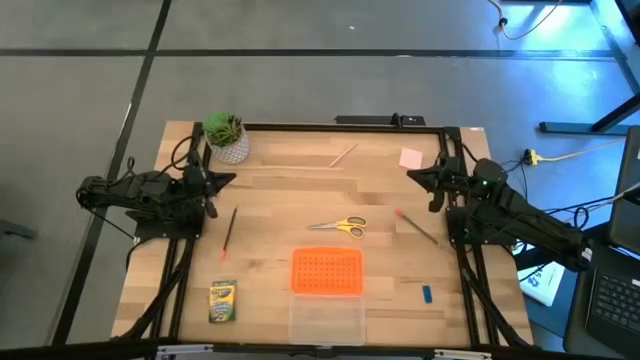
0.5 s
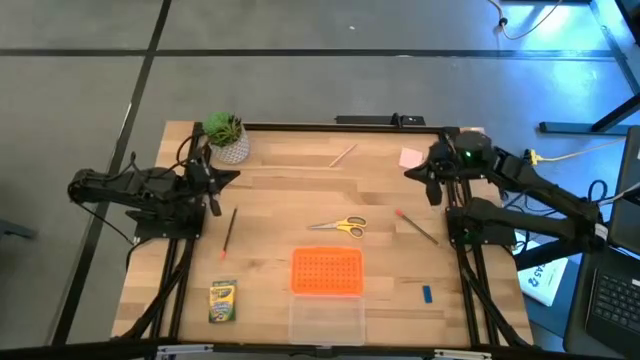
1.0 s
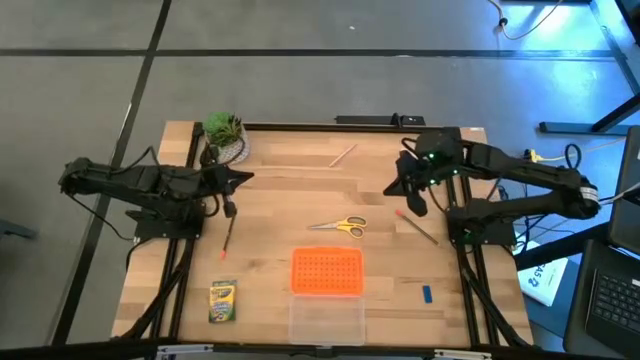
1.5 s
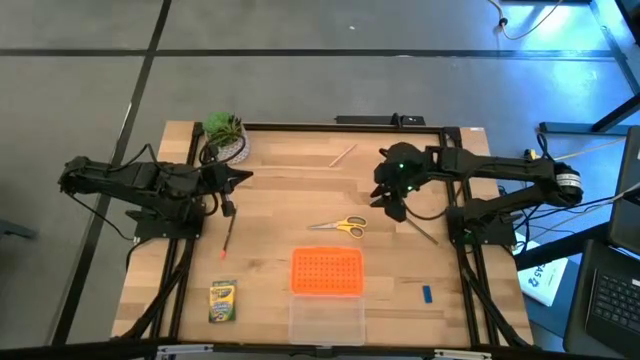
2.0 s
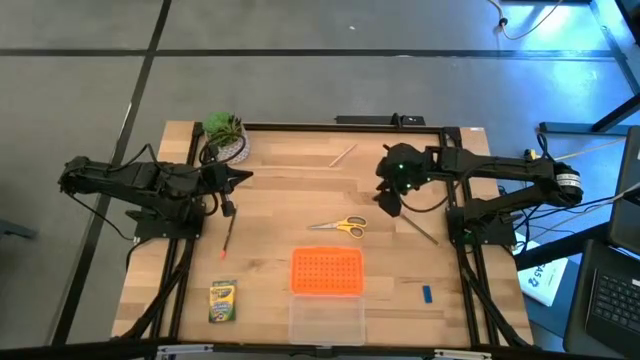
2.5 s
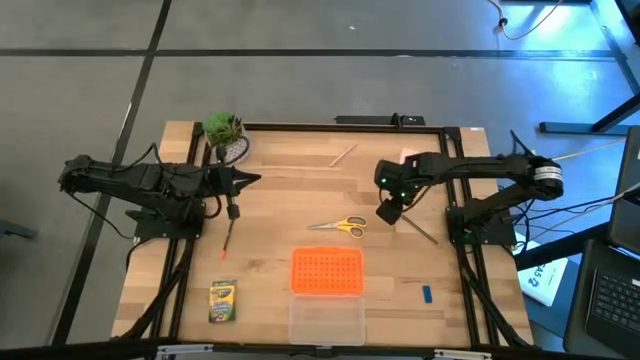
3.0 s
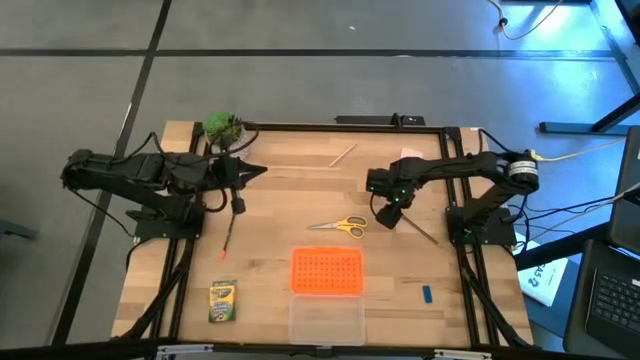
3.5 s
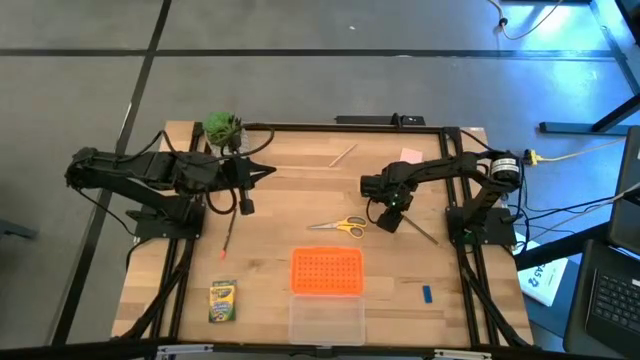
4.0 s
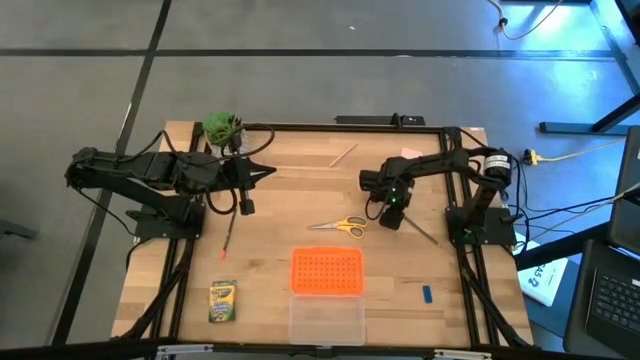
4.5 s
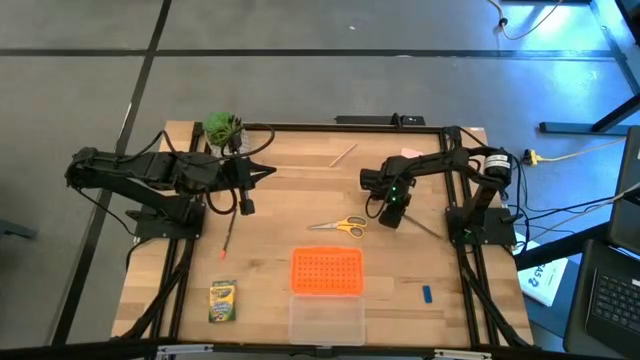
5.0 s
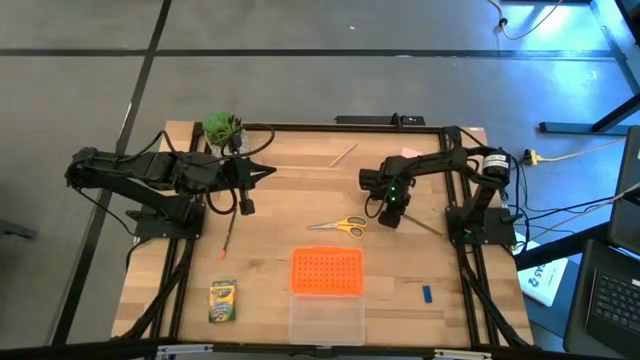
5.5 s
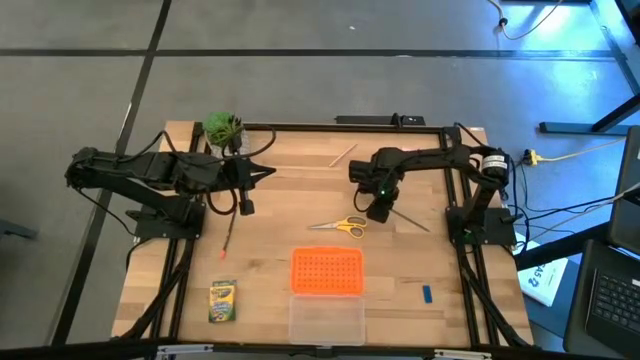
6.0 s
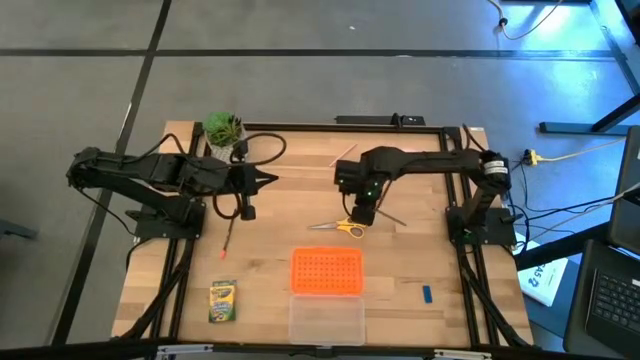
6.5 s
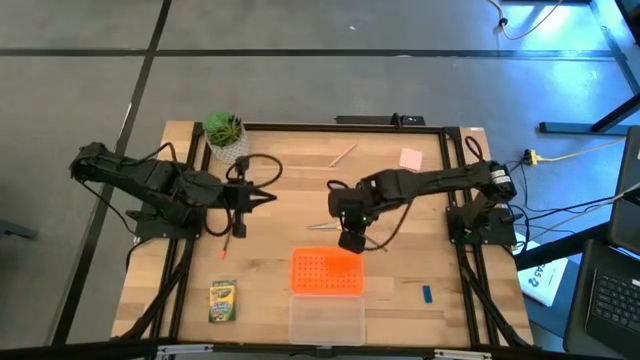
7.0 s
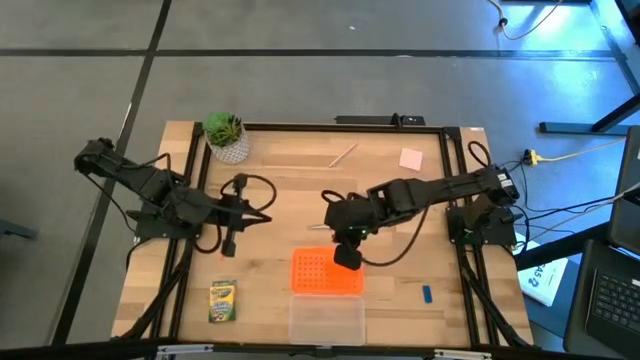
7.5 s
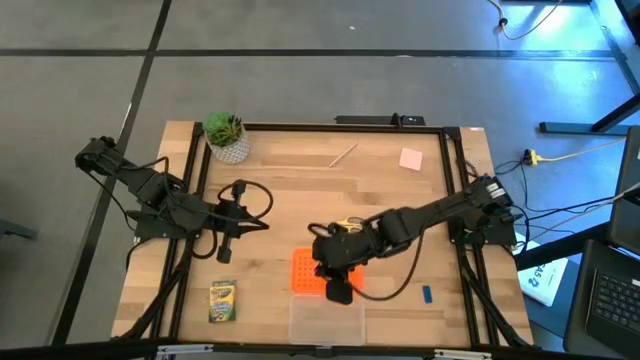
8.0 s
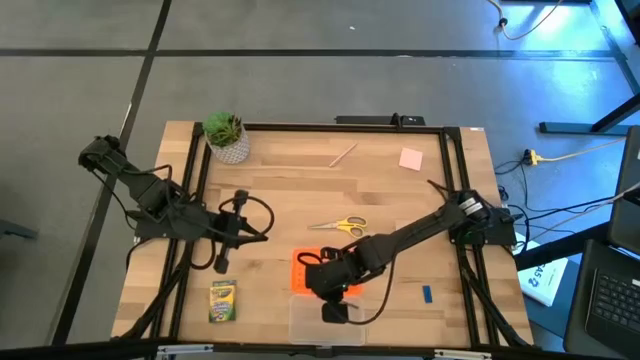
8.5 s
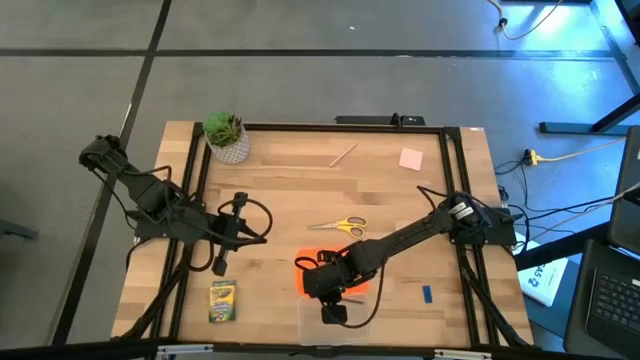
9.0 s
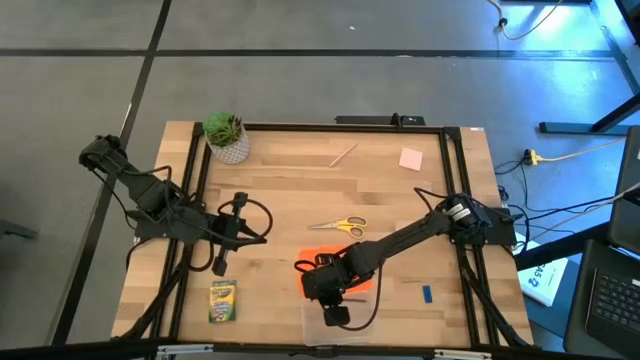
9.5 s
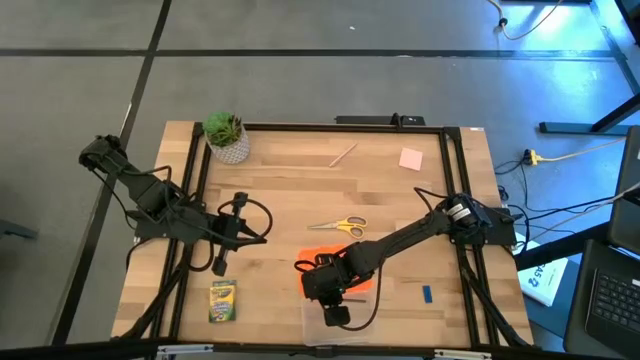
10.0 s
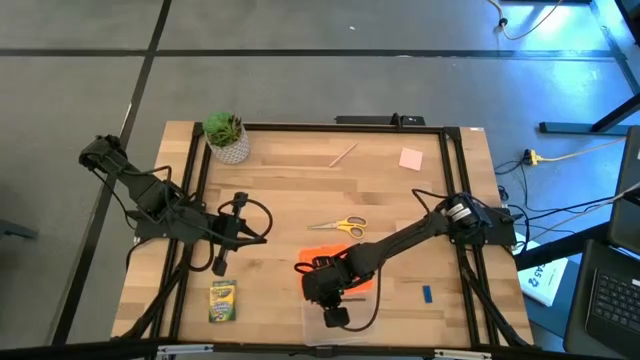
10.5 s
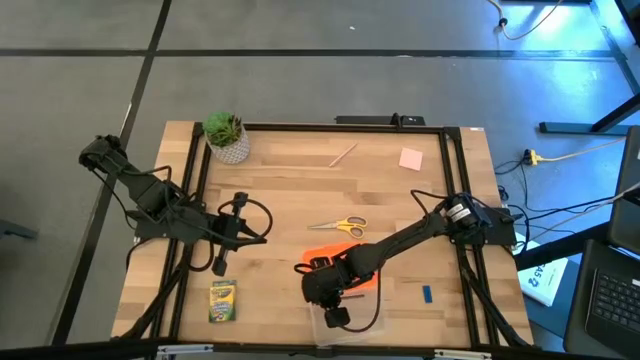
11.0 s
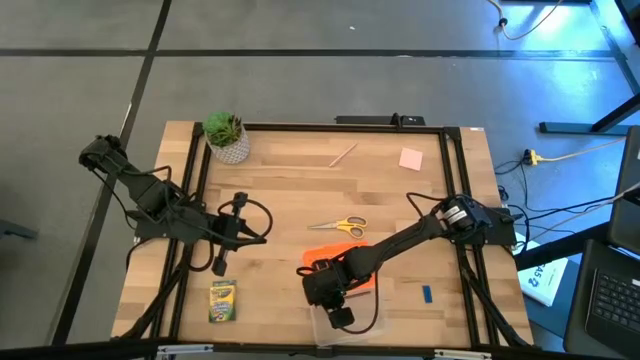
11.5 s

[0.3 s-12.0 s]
Task: Pack school essentials
Put the right black pencil into the orange supply box

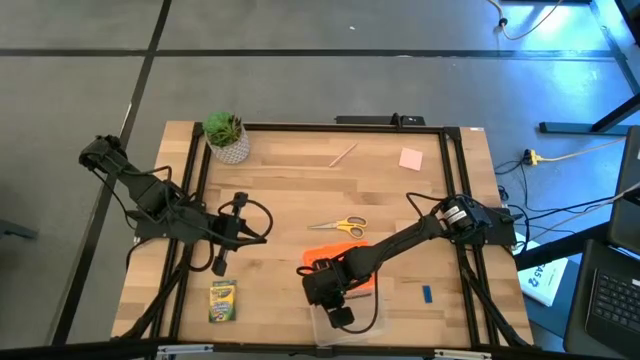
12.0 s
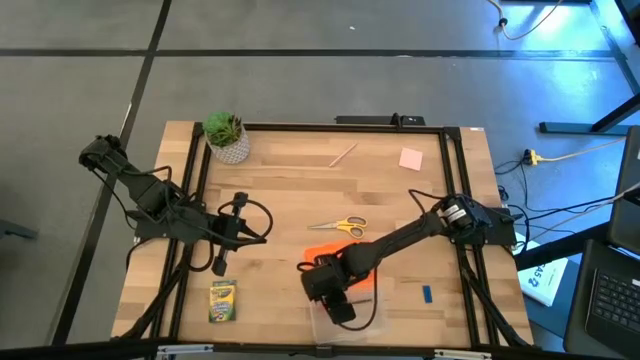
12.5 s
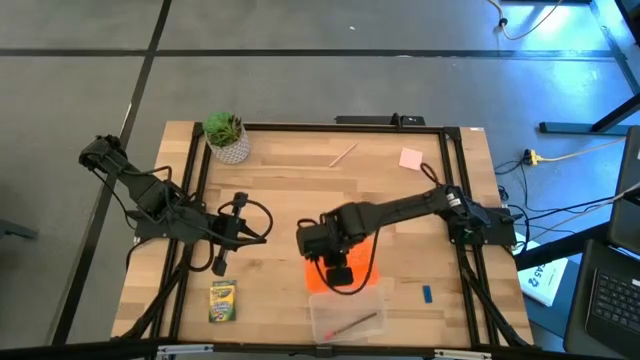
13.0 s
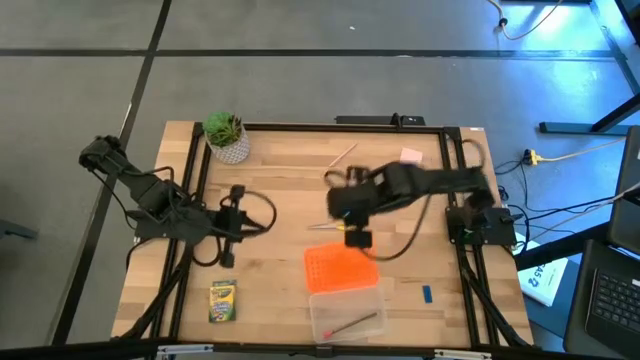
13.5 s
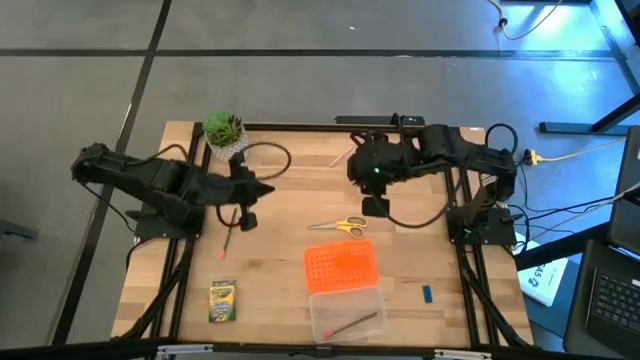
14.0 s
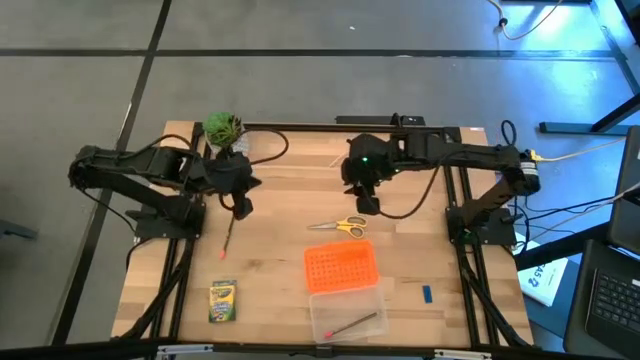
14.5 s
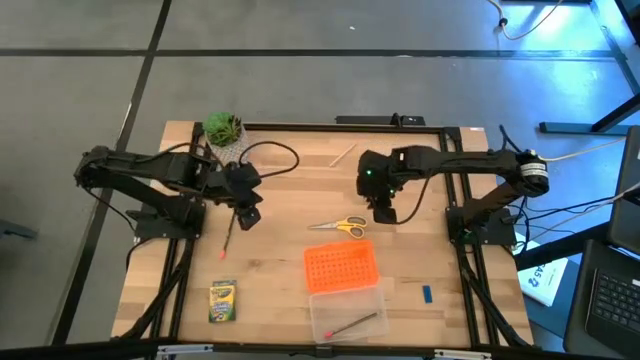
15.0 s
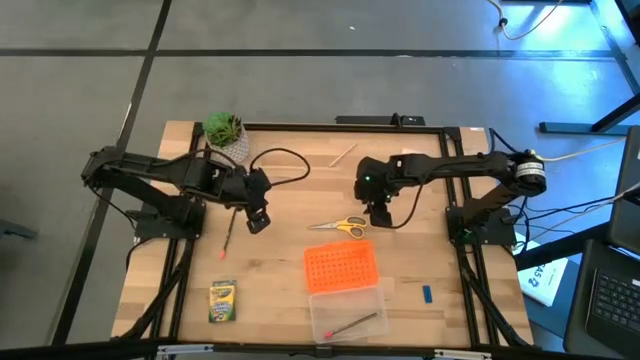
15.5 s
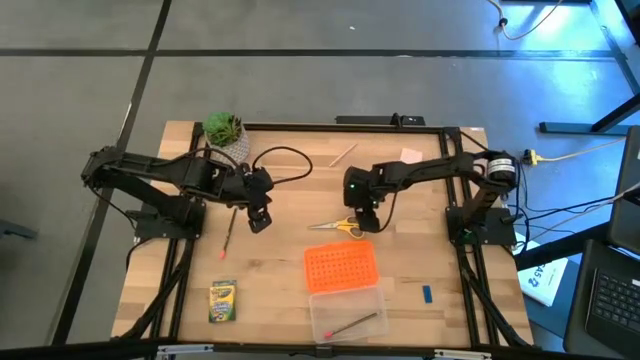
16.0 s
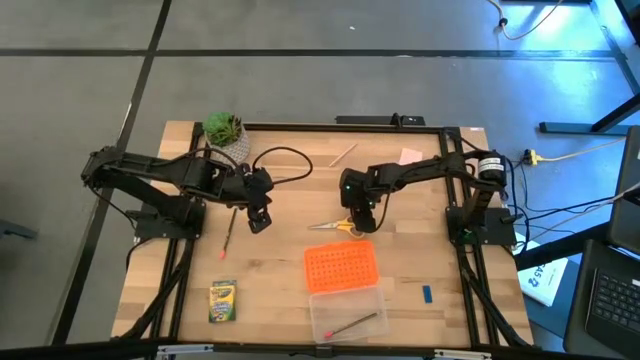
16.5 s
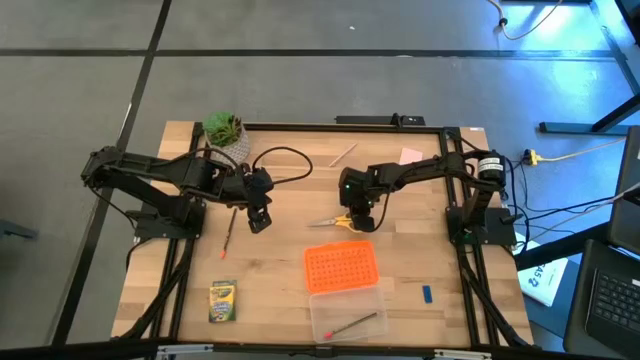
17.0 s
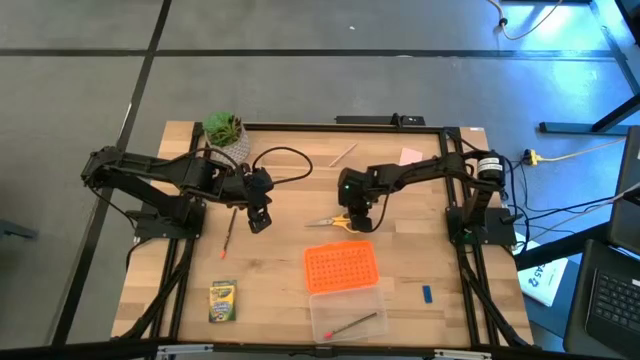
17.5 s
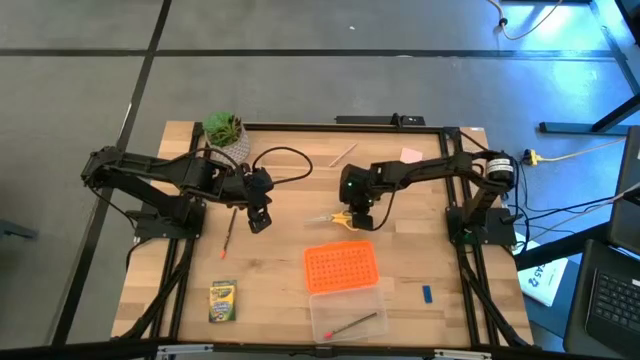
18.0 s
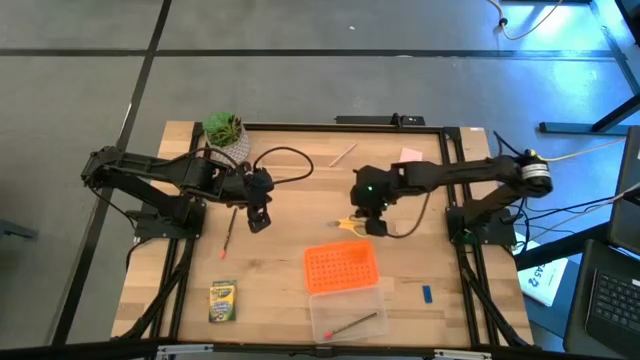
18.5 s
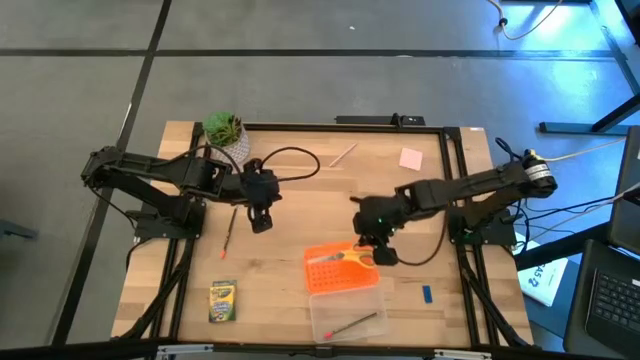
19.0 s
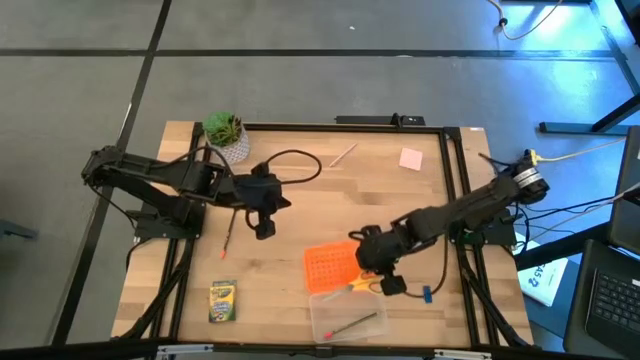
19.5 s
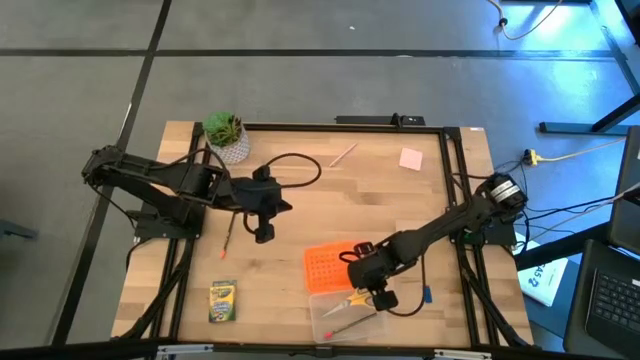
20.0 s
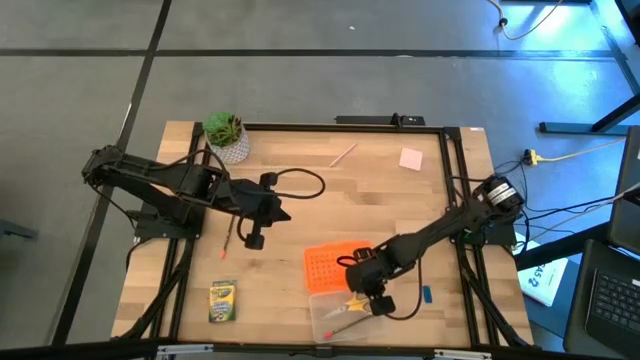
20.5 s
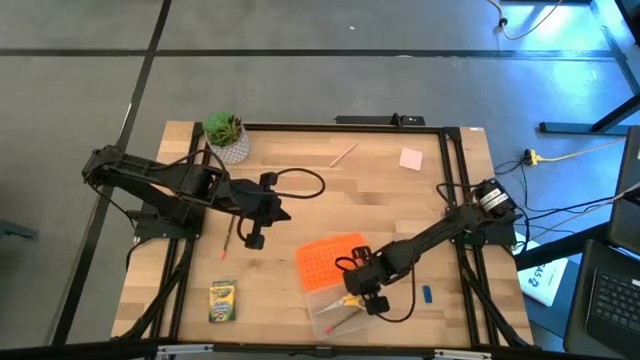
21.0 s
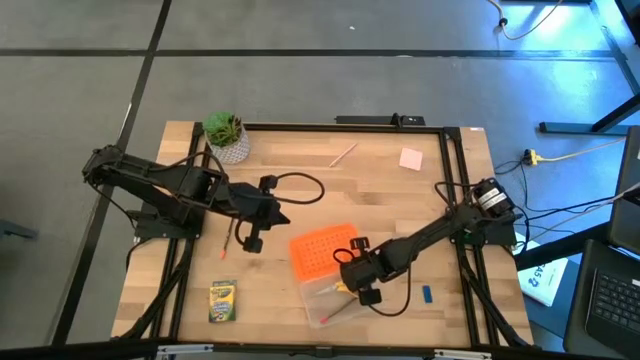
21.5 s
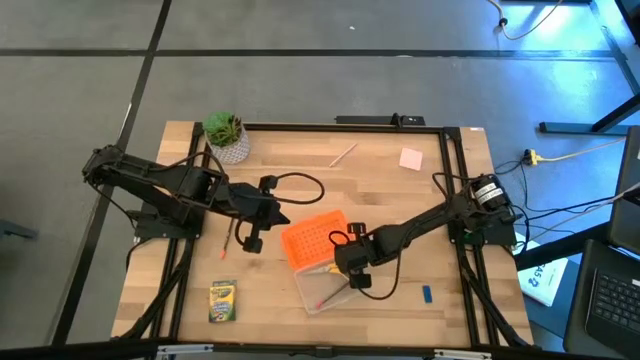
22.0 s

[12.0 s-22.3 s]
Put the yellow scissor into the orange supply box
